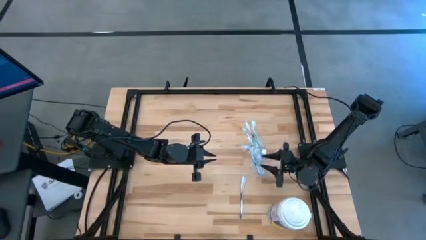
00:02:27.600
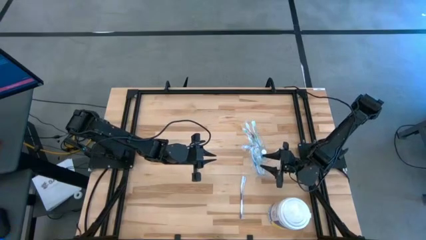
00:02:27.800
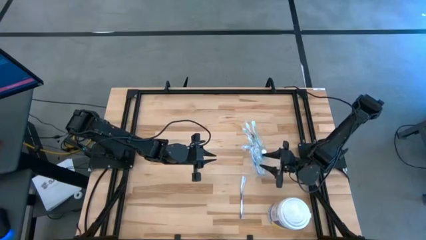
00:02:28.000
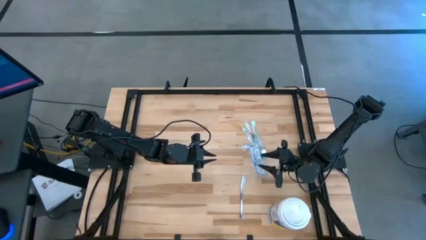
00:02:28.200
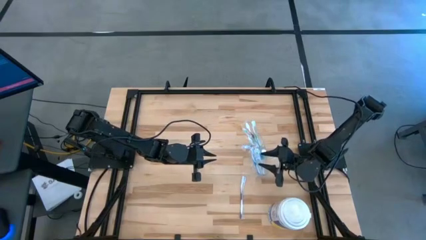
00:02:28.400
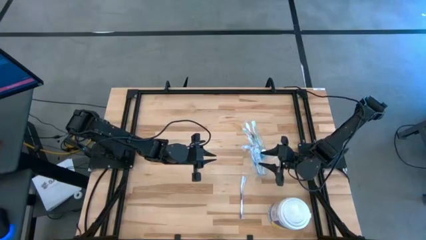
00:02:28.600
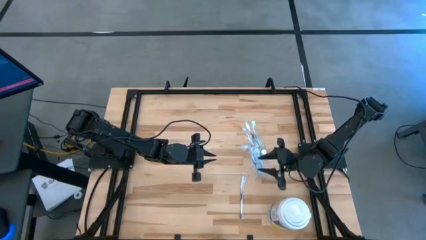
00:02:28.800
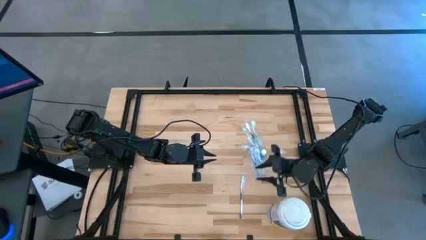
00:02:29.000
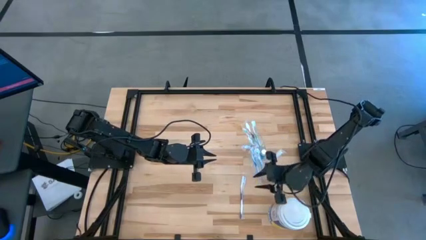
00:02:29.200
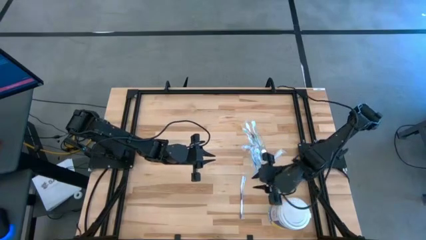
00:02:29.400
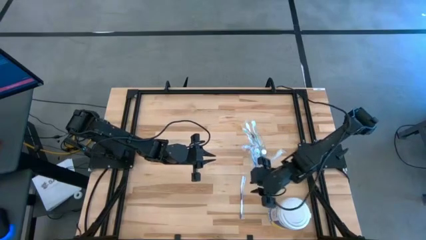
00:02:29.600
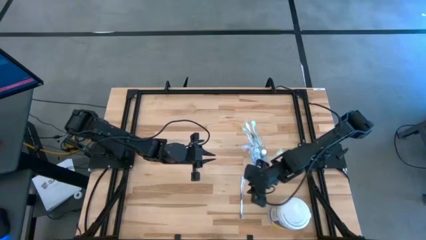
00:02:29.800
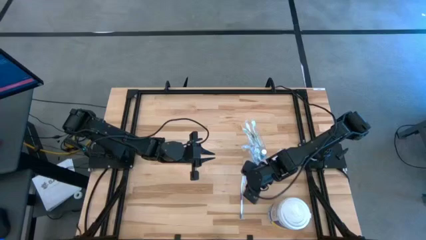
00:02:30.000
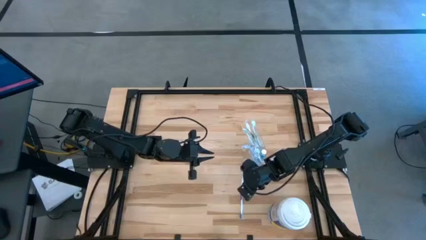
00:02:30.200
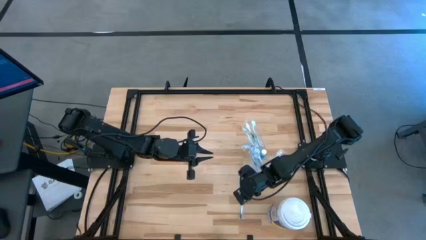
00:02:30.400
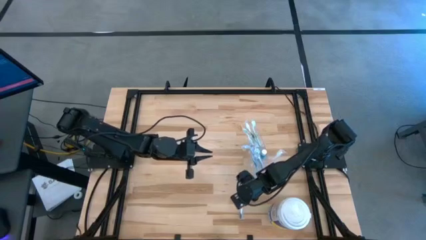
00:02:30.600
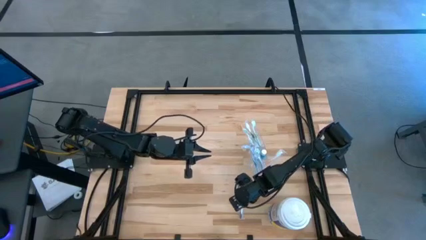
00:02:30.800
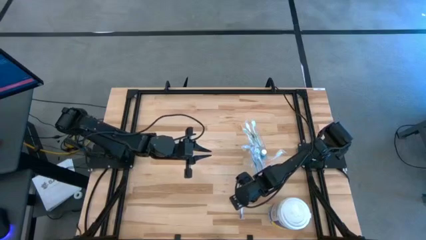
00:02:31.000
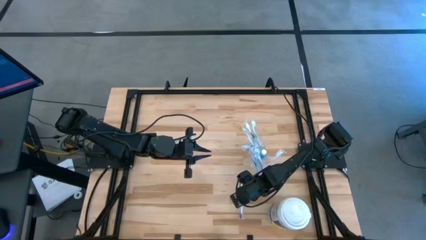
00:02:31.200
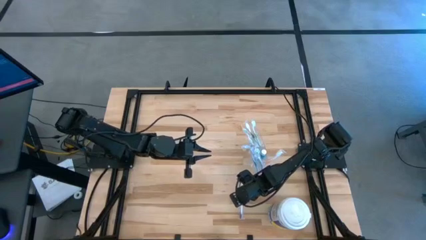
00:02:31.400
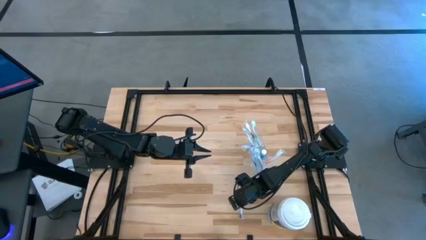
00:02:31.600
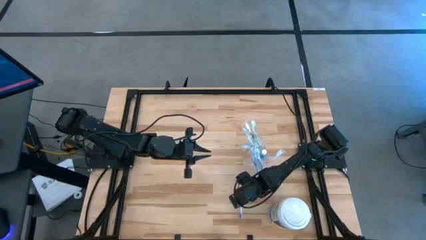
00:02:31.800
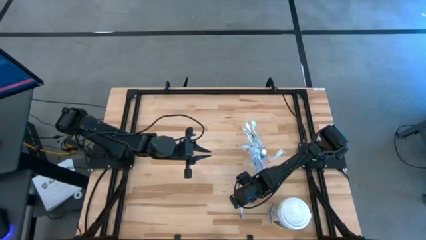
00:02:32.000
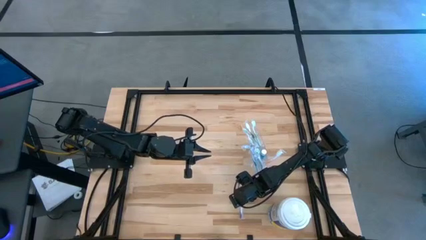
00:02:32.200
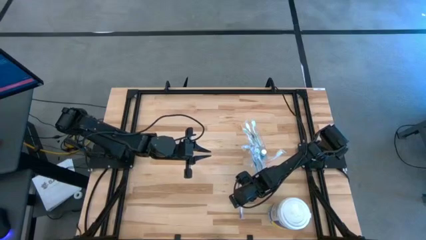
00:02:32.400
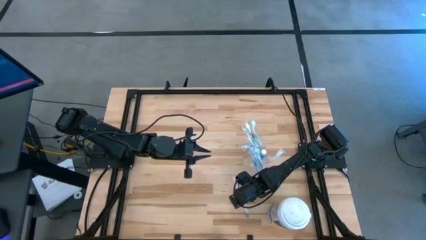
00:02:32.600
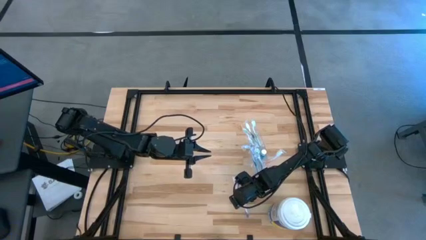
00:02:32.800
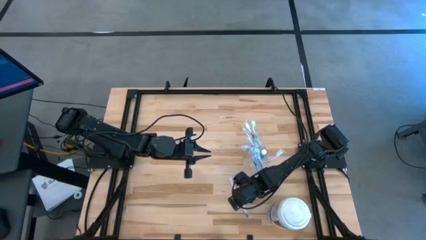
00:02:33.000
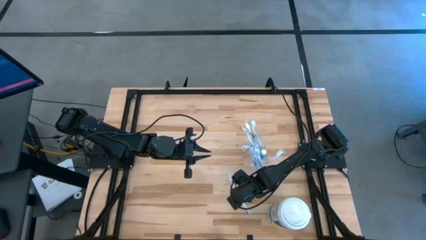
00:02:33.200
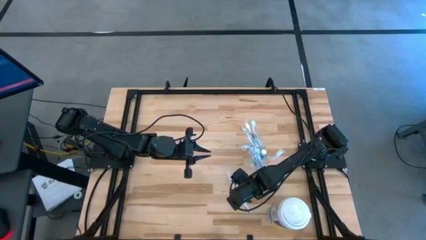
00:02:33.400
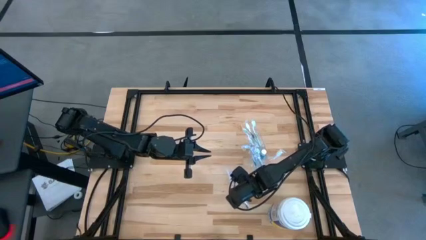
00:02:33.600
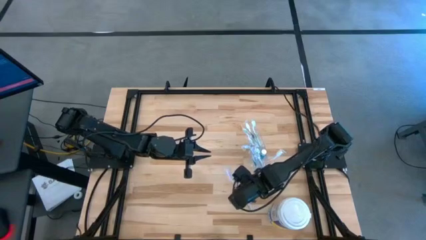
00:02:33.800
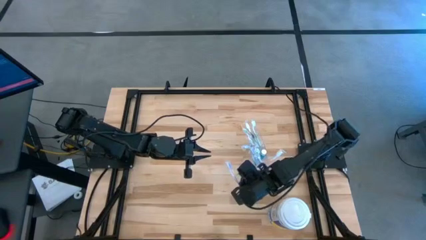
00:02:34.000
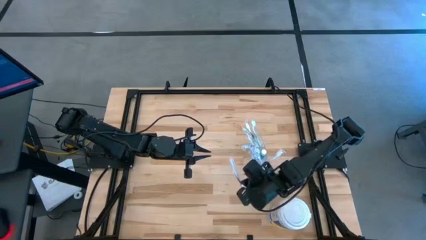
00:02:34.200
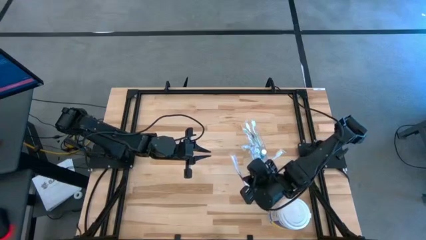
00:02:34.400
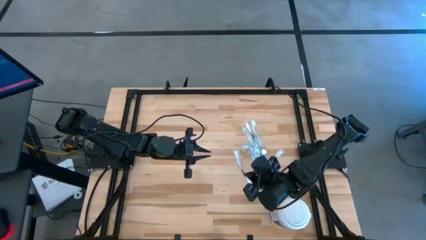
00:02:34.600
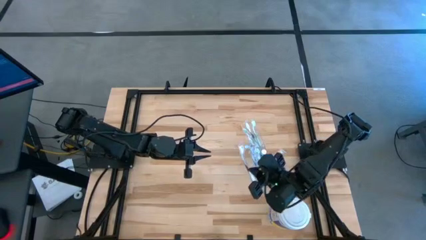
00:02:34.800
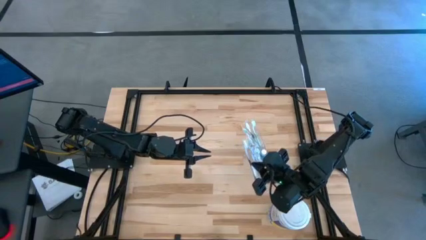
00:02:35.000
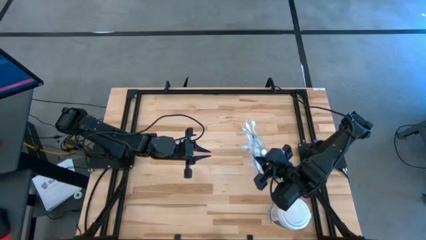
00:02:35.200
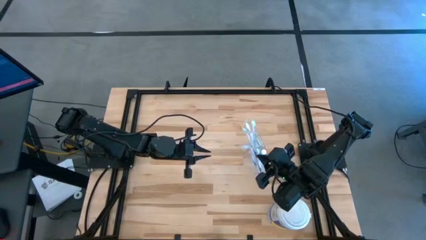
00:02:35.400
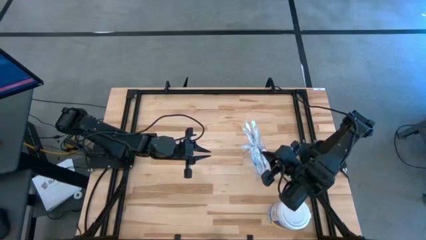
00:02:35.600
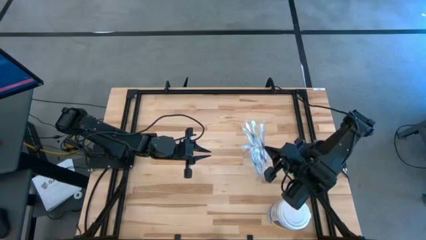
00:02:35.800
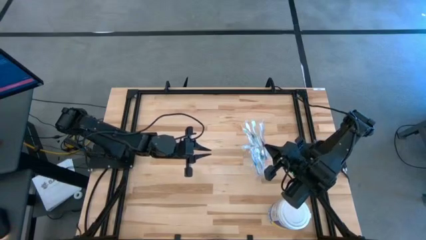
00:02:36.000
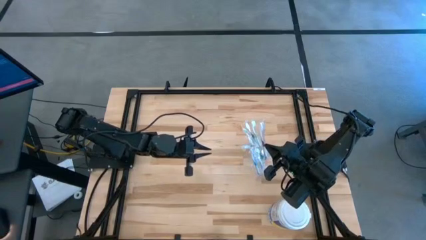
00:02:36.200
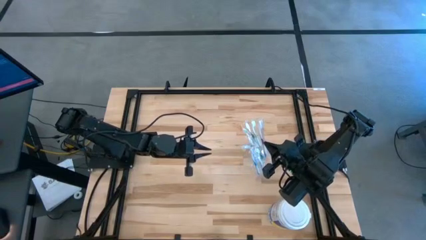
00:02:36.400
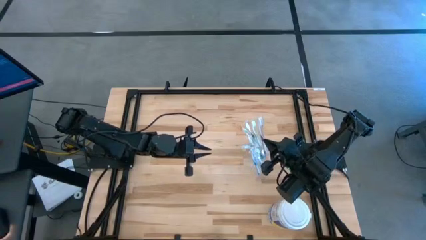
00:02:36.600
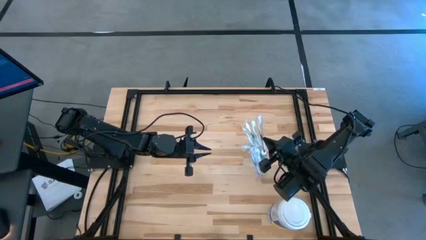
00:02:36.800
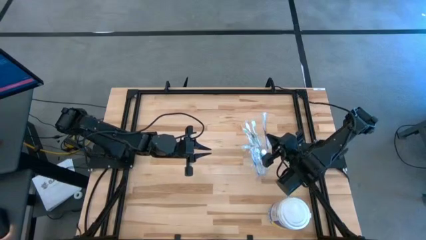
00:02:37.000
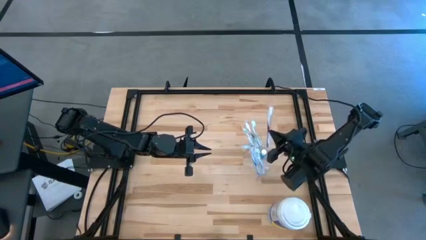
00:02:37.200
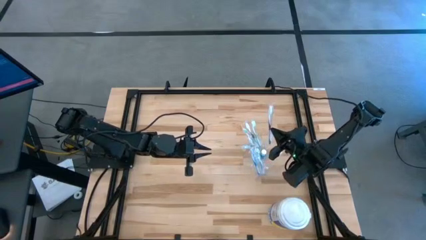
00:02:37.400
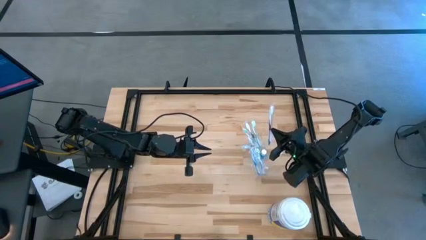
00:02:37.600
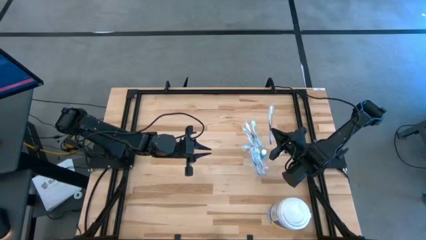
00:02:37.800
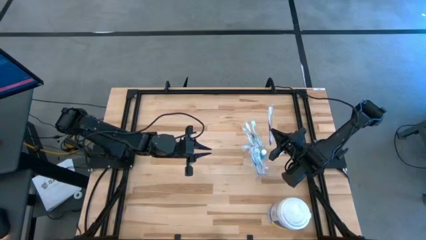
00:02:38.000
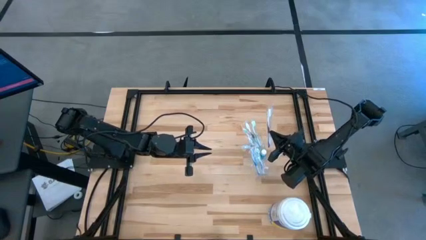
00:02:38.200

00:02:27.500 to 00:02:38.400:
Task: Pick & Place toothbrushing station
Put the purple toothbrush into the transparent organizer

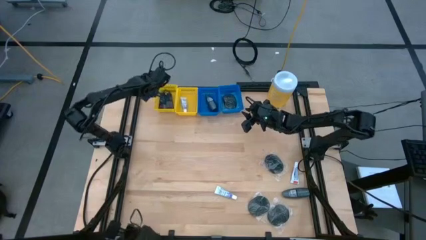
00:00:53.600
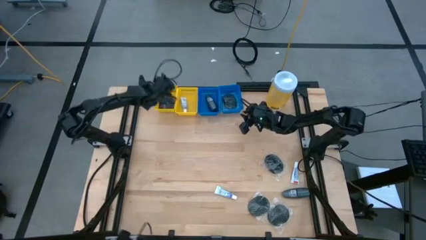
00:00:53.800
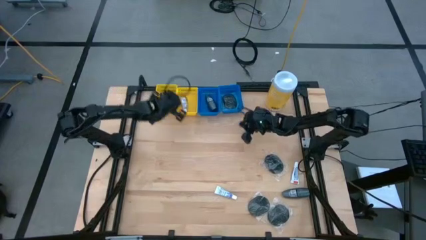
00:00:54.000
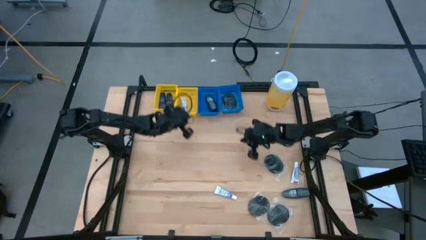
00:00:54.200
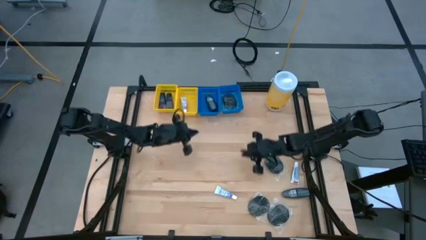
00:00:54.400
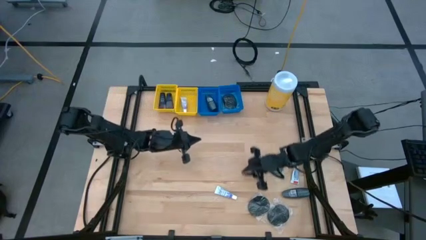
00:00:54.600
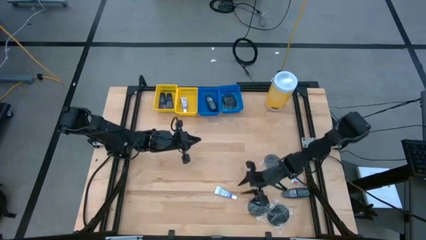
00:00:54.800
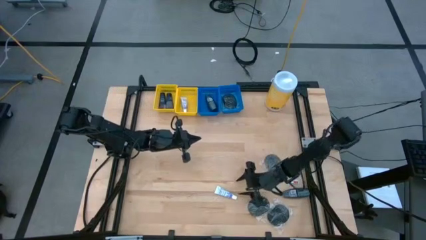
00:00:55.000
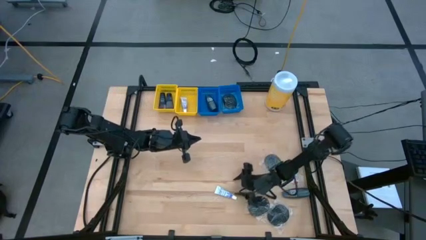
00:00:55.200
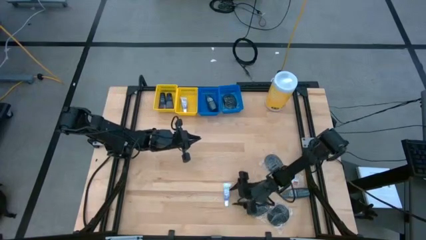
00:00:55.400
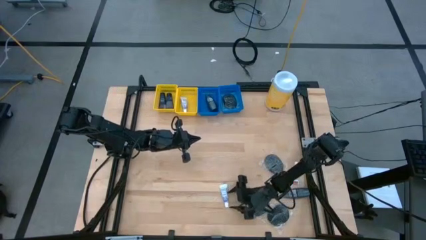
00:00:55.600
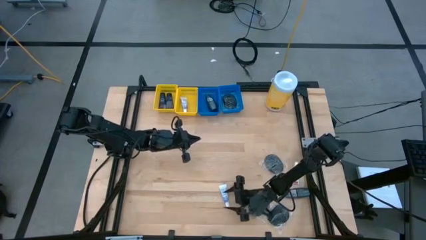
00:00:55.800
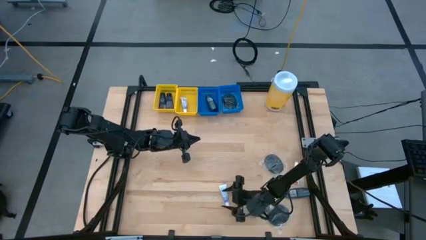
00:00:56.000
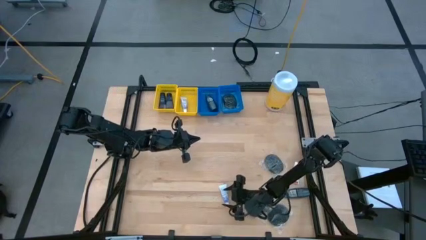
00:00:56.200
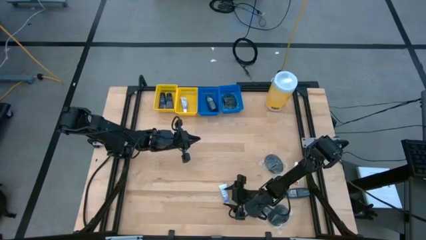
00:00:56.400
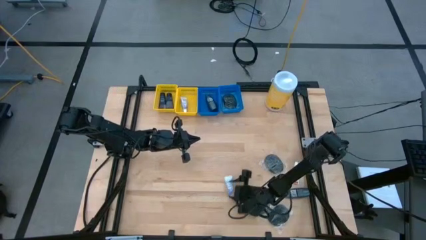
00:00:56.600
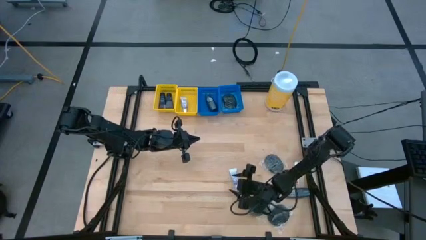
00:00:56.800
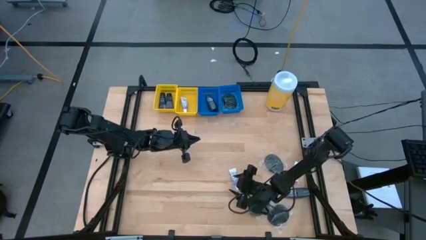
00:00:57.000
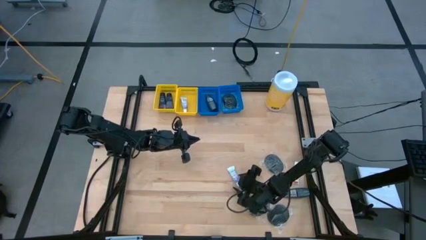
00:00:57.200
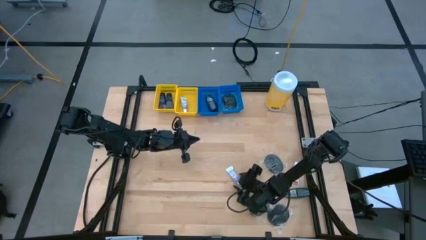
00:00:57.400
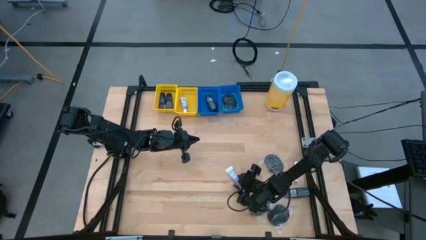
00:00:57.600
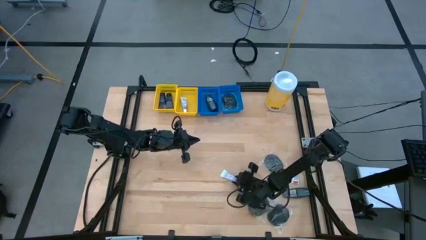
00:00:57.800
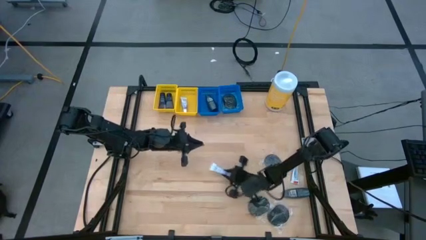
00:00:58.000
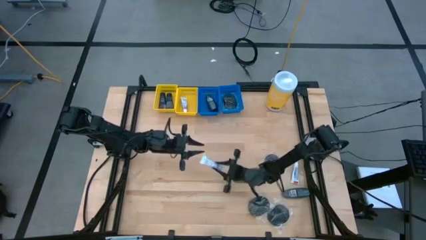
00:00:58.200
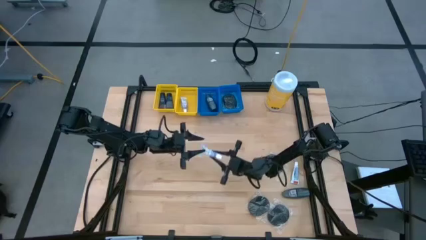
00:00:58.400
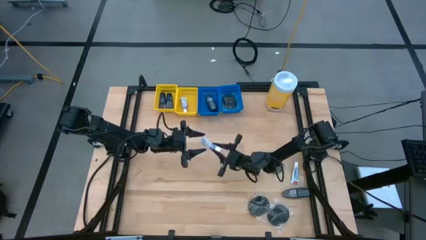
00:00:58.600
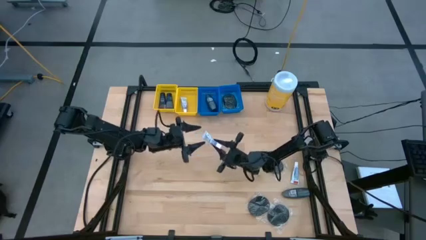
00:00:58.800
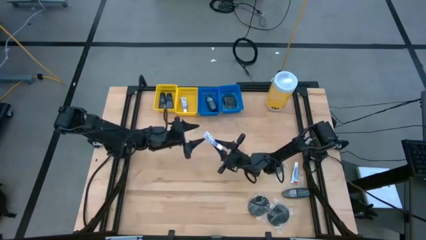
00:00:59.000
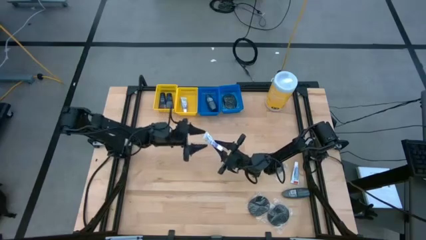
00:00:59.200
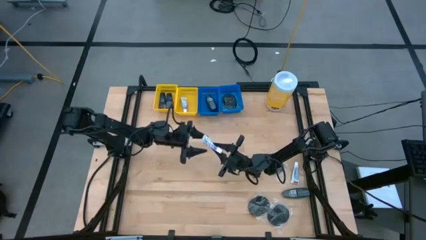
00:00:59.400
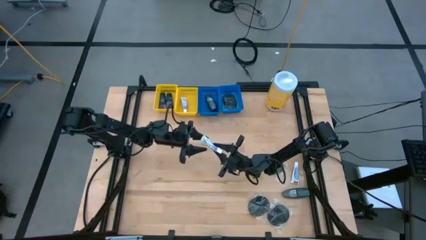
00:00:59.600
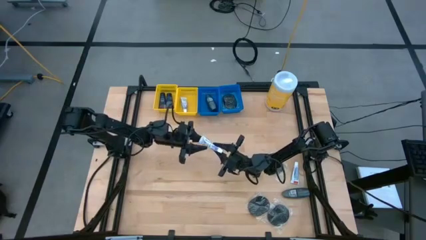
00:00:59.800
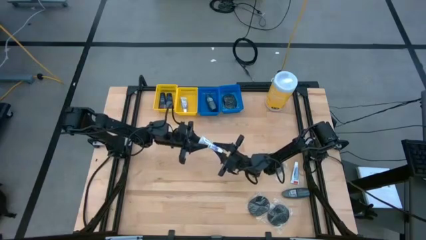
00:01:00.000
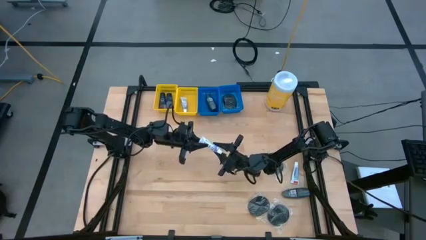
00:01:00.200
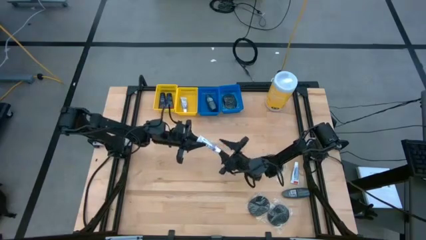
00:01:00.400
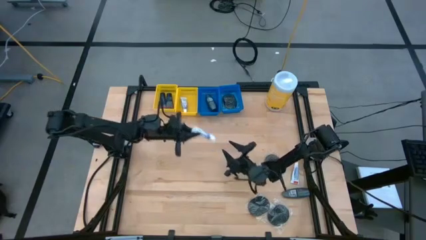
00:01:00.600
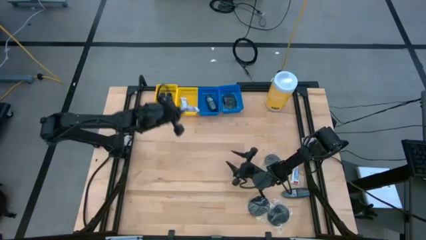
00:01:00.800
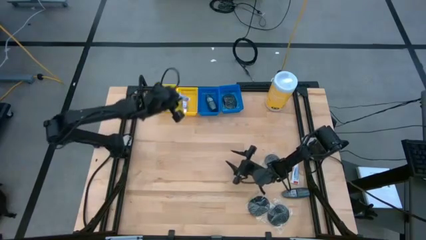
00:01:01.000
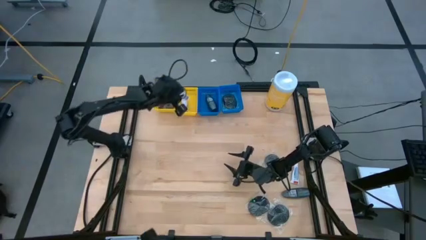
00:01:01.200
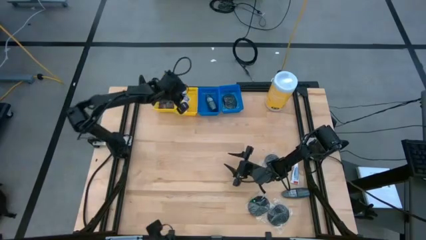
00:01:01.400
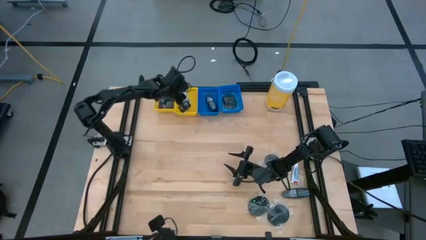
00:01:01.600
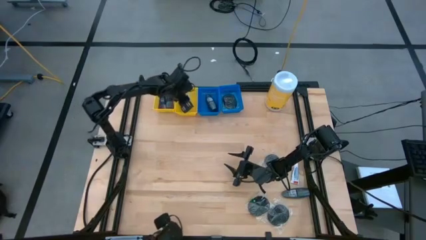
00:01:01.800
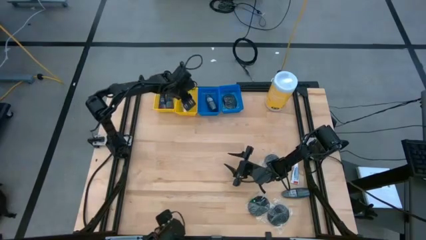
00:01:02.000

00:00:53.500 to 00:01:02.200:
Task: Pick & Place Travel size toiletries
Put the white toothpaste into the right yellow bin
